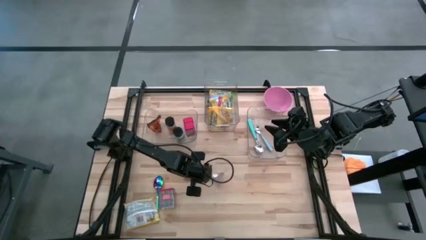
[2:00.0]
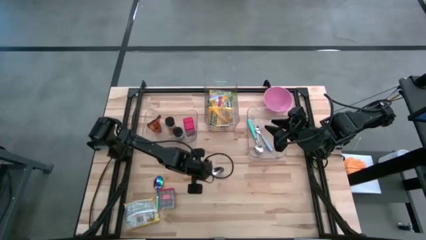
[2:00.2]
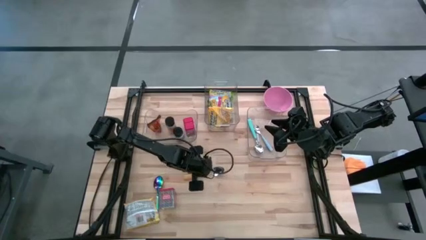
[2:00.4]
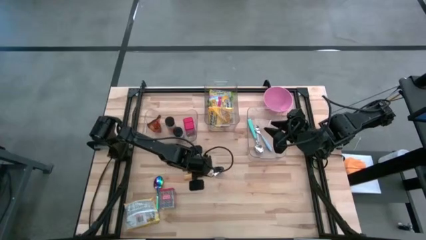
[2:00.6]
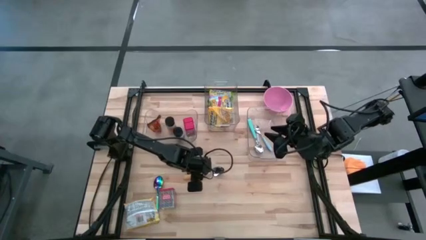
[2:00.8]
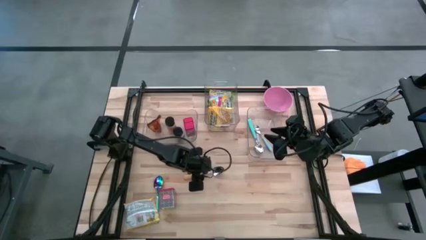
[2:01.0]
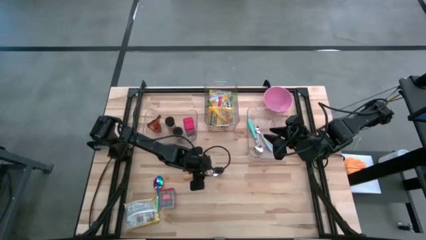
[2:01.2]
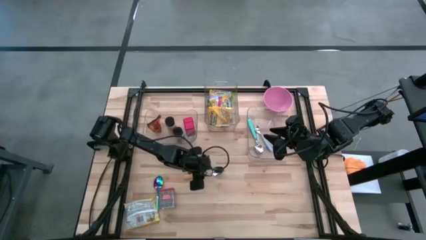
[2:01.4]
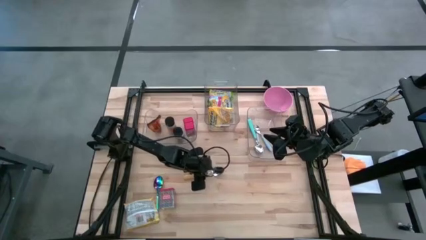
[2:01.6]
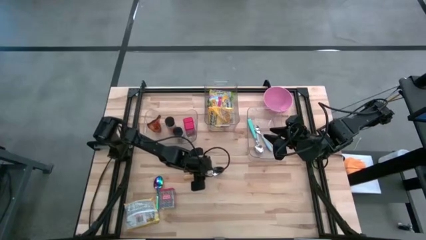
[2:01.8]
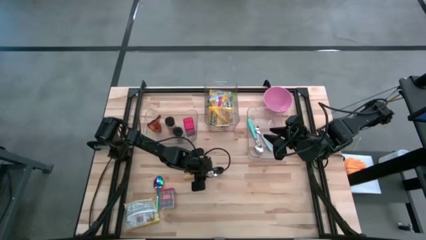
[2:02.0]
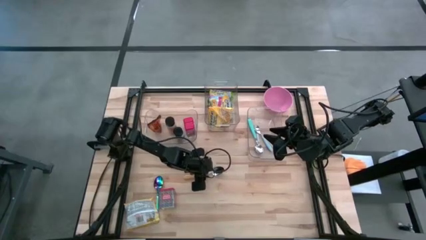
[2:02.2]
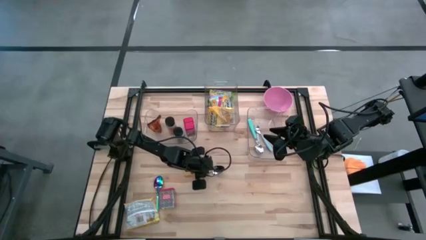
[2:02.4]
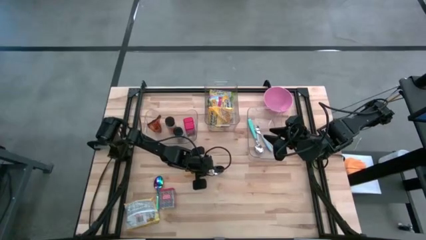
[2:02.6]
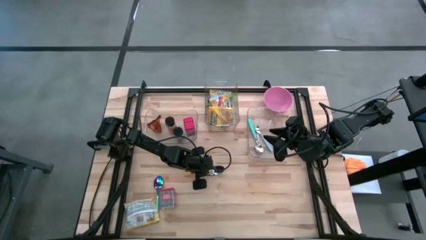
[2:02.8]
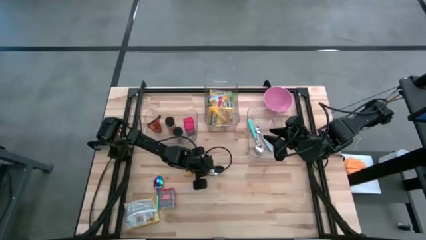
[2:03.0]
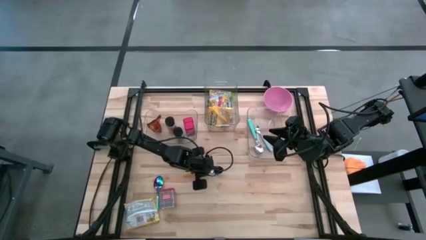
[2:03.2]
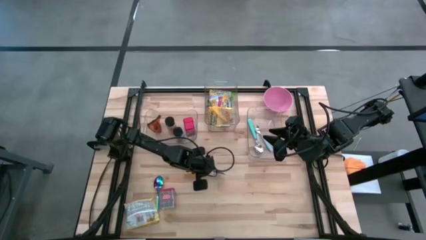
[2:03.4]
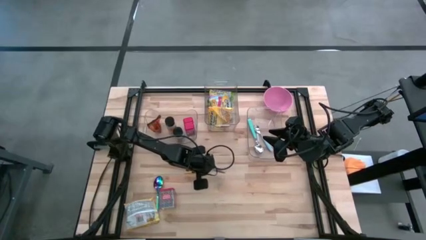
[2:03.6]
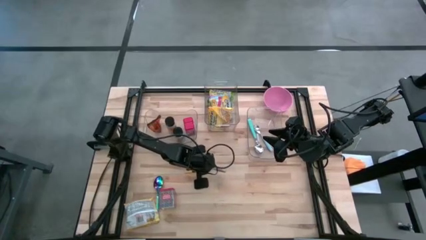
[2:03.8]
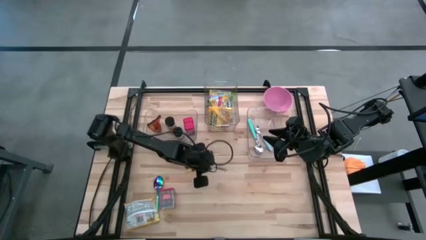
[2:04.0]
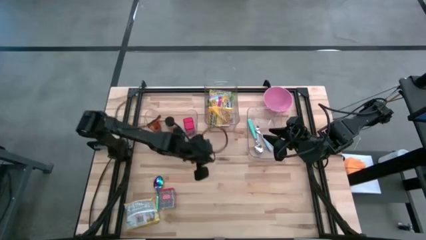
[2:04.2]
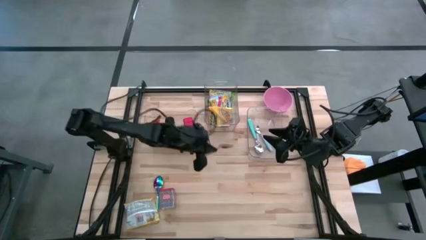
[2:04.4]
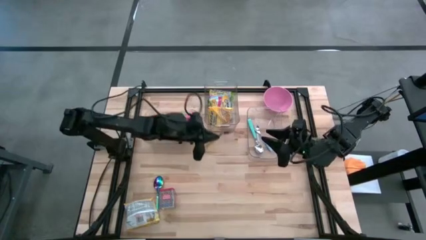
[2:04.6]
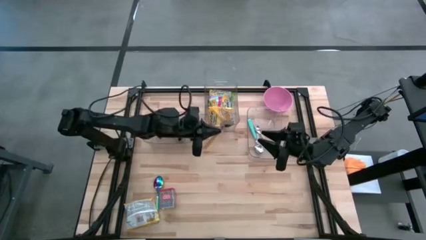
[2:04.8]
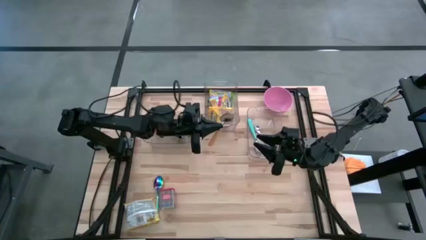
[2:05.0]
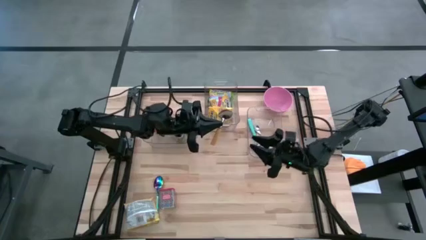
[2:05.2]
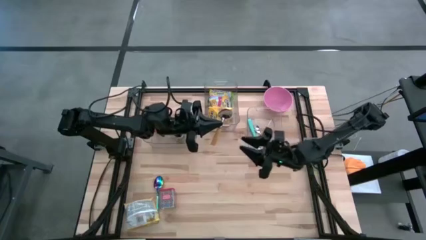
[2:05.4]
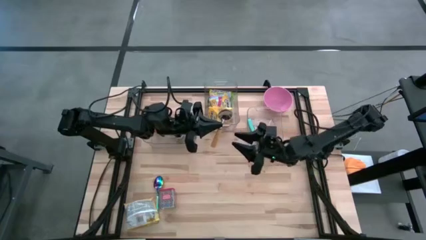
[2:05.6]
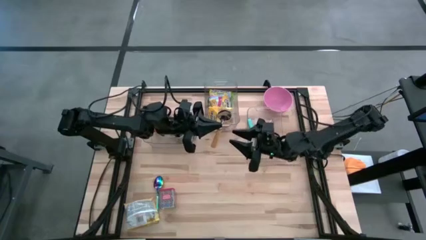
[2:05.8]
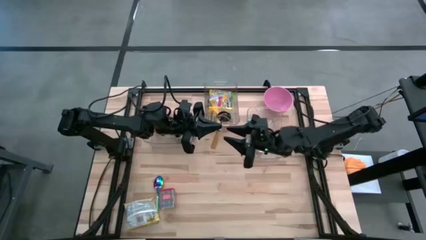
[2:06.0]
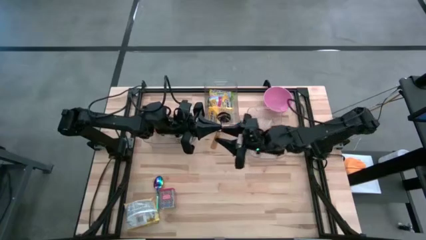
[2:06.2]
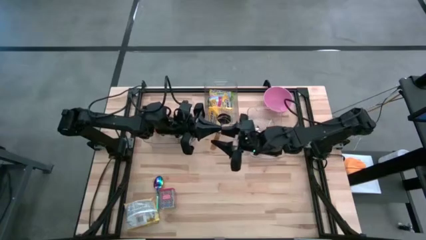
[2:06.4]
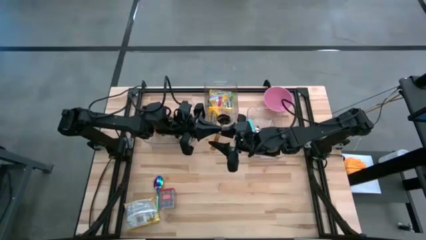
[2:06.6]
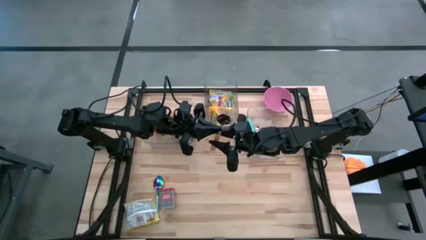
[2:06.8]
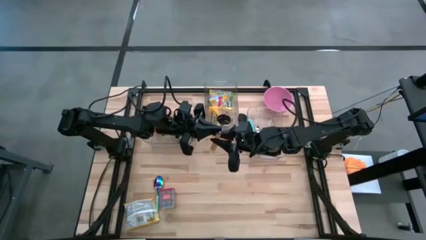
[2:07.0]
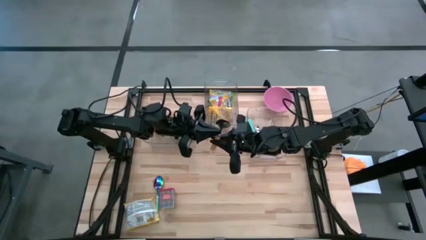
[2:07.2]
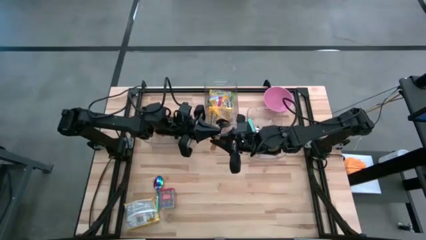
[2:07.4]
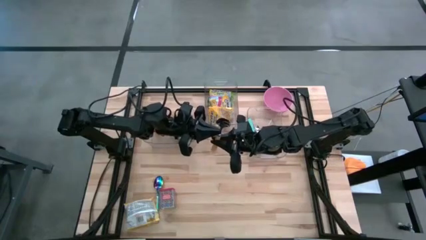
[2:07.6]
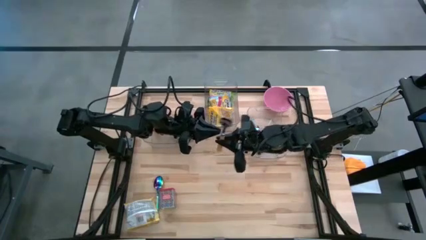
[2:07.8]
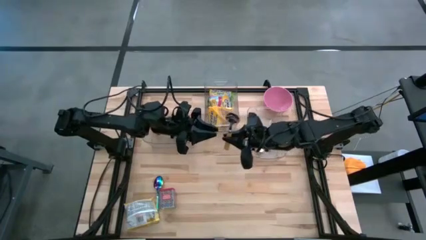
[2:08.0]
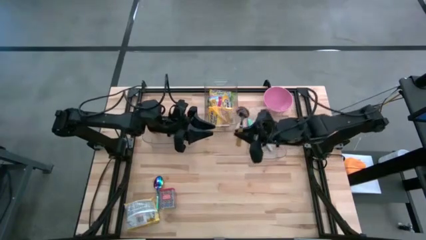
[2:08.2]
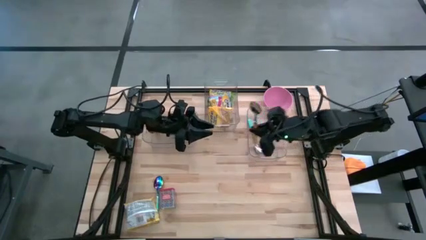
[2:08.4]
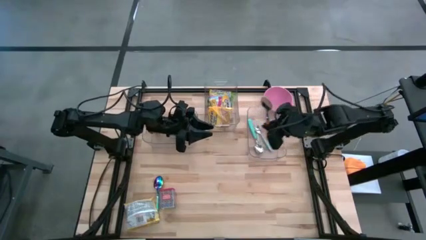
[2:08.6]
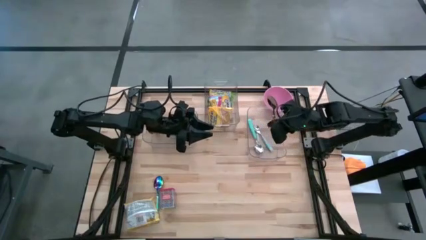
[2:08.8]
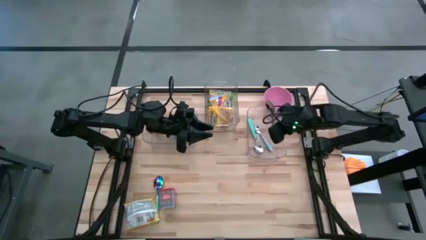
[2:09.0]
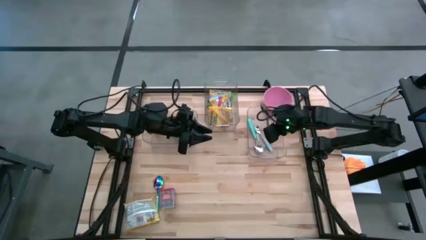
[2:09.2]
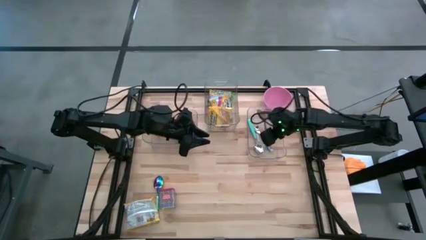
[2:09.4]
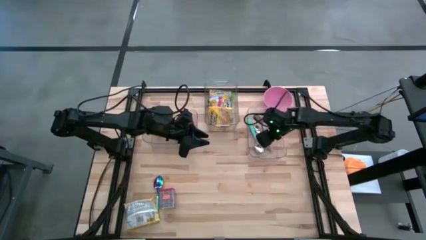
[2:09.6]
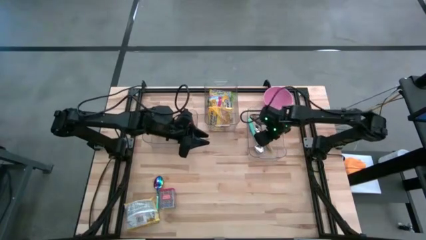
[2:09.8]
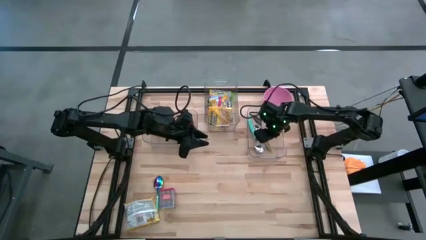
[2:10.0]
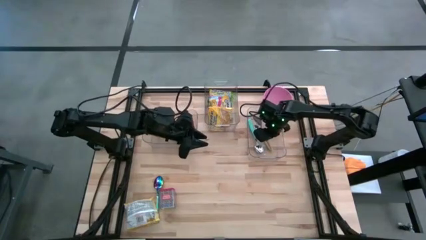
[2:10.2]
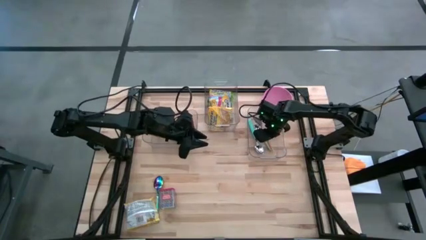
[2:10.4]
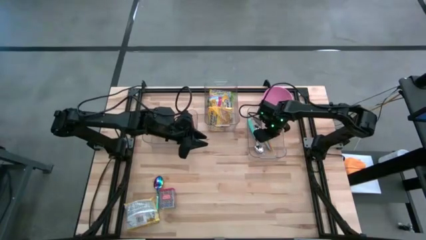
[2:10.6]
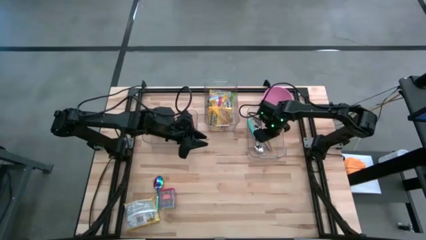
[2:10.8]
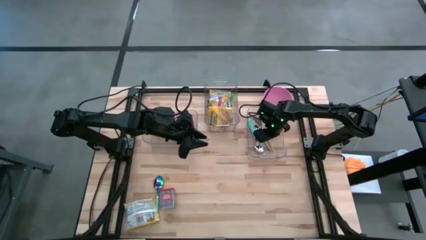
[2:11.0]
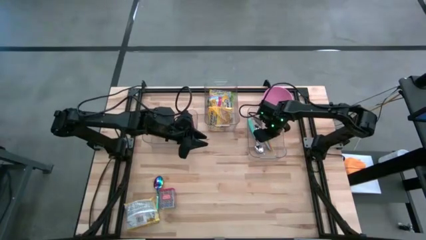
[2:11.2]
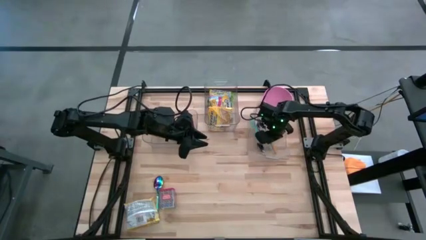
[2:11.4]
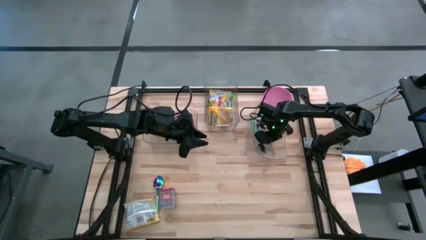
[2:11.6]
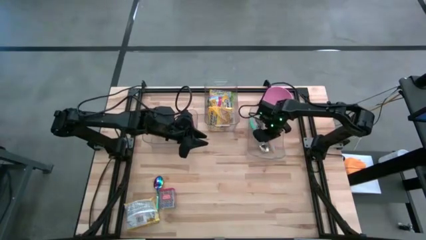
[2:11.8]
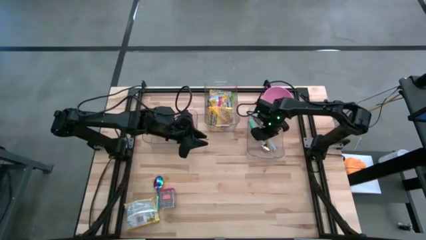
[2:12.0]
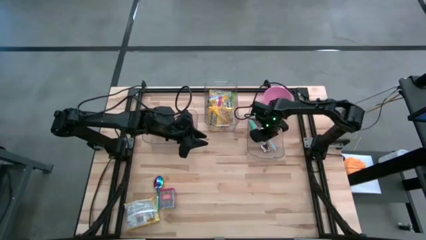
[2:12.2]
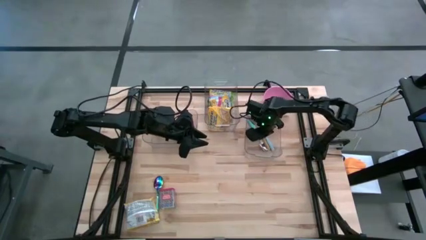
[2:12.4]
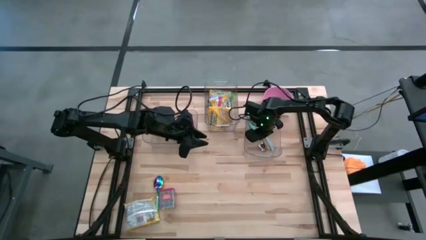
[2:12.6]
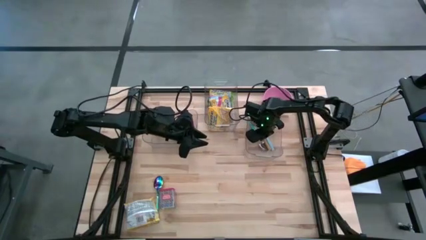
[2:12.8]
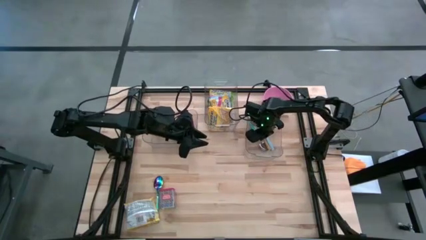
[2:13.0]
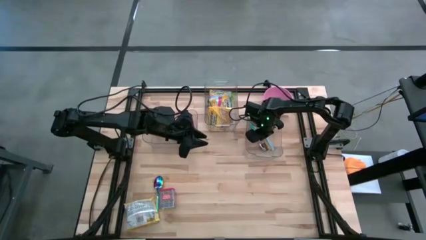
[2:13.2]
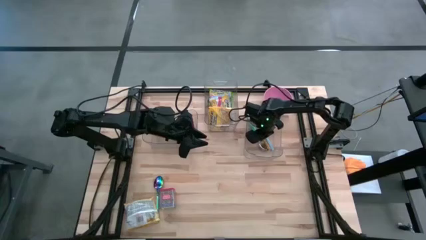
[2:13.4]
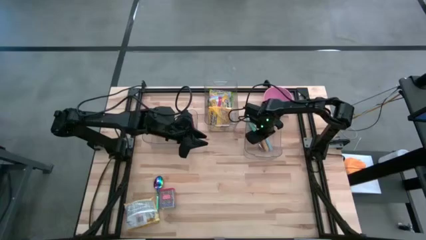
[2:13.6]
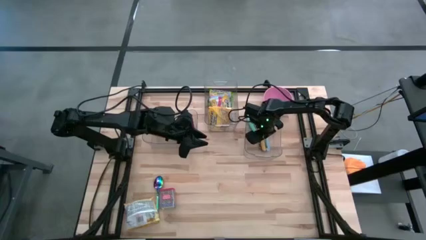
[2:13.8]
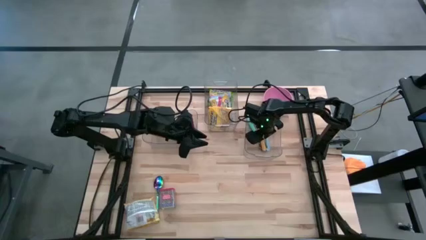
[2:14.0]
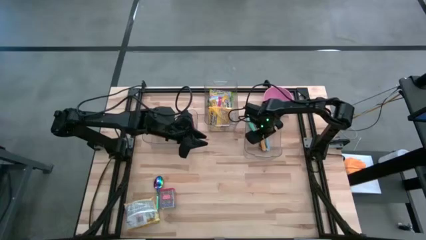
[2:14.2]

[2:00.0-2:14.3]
Put the yellow spoon into the right transparent bin
